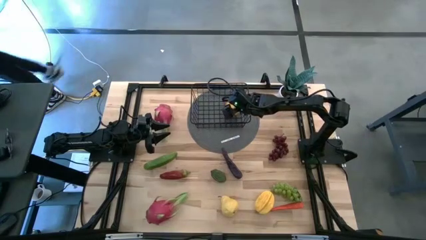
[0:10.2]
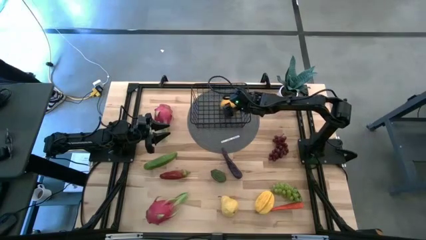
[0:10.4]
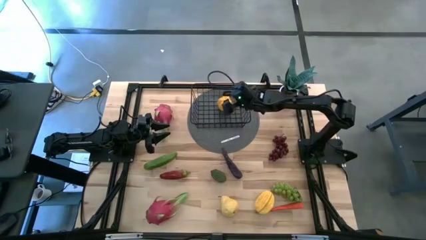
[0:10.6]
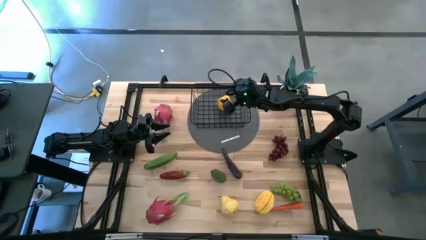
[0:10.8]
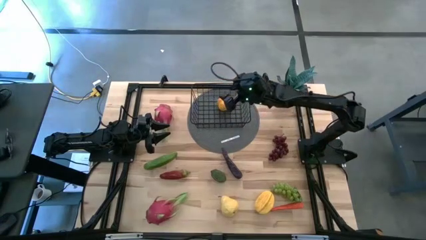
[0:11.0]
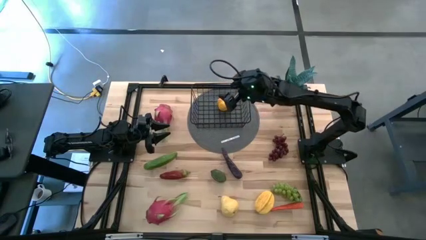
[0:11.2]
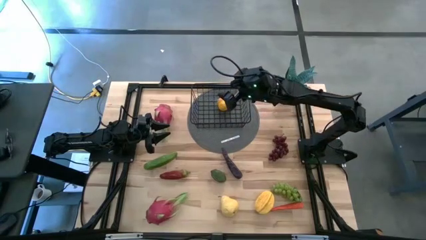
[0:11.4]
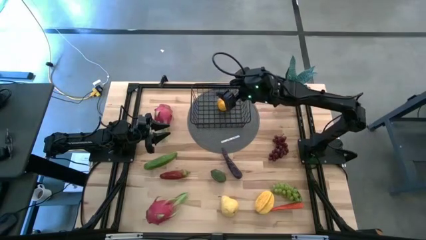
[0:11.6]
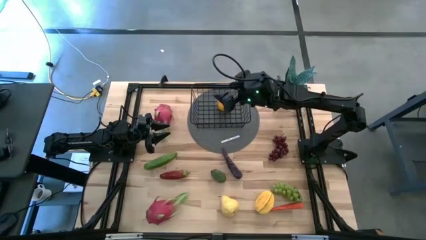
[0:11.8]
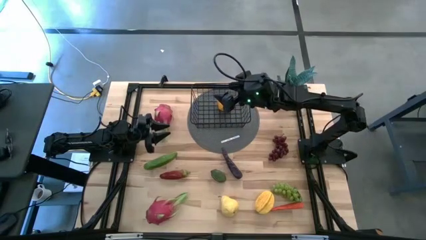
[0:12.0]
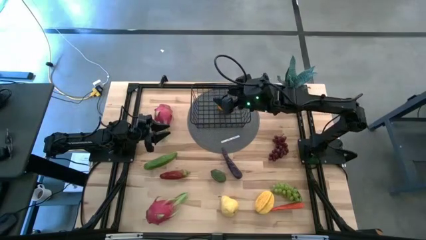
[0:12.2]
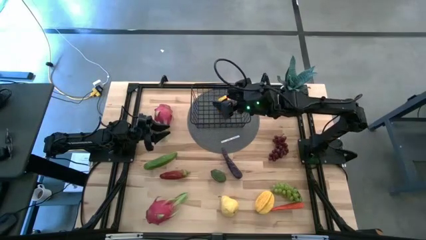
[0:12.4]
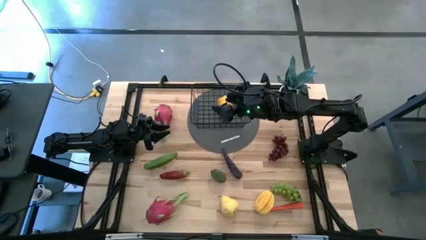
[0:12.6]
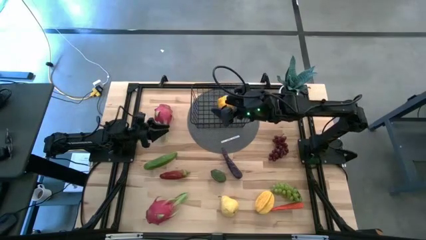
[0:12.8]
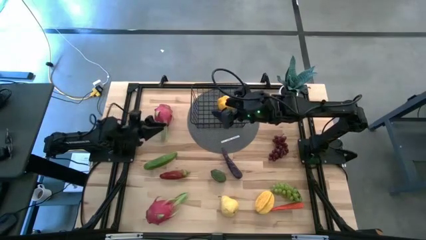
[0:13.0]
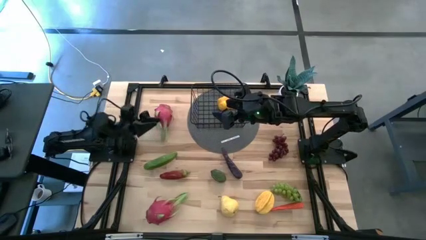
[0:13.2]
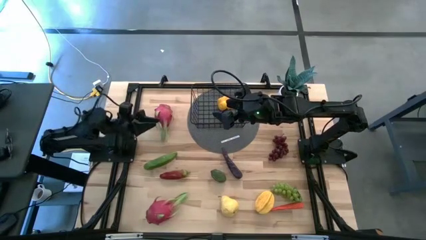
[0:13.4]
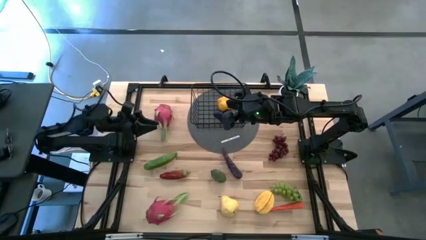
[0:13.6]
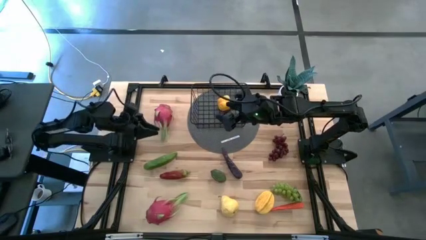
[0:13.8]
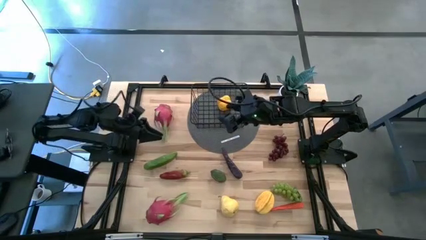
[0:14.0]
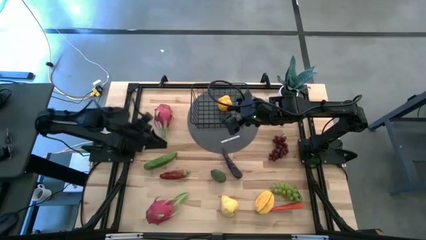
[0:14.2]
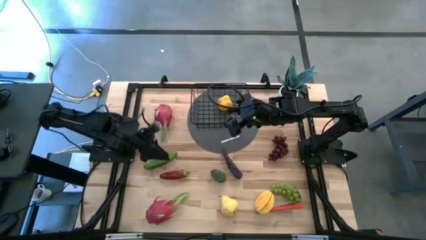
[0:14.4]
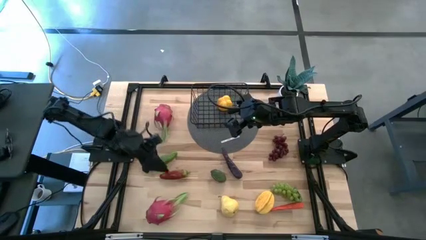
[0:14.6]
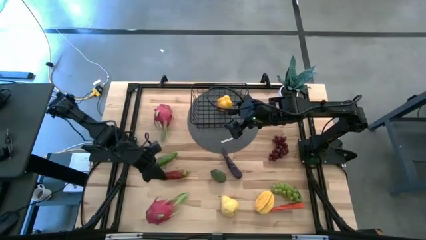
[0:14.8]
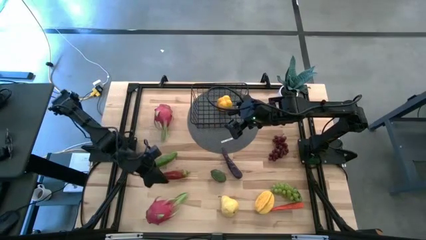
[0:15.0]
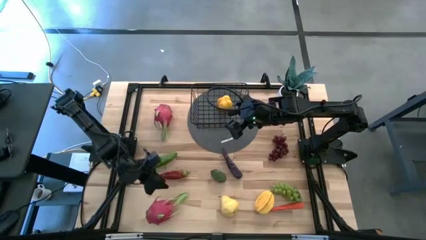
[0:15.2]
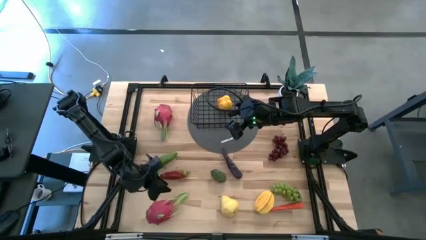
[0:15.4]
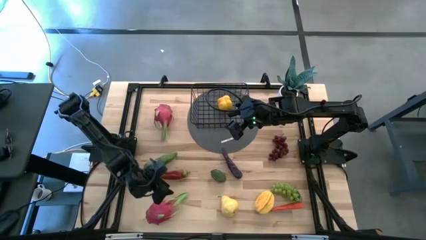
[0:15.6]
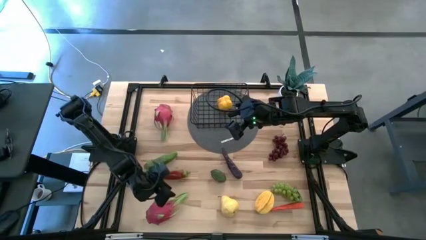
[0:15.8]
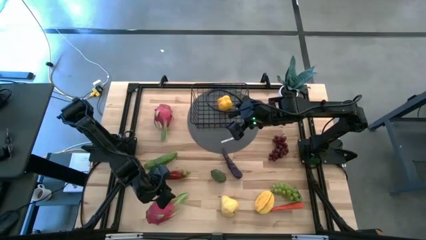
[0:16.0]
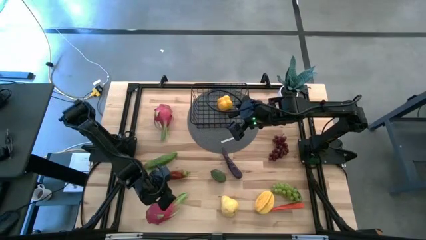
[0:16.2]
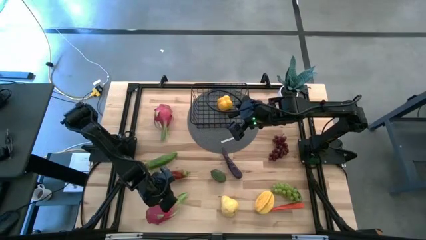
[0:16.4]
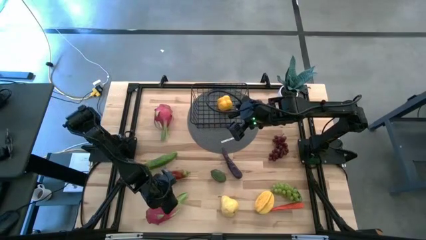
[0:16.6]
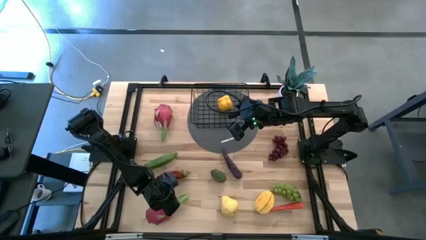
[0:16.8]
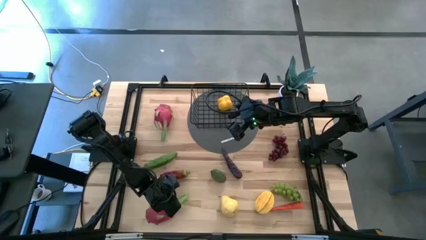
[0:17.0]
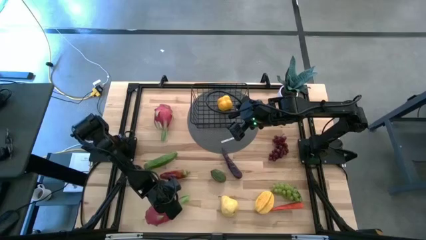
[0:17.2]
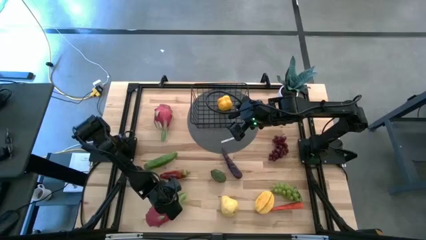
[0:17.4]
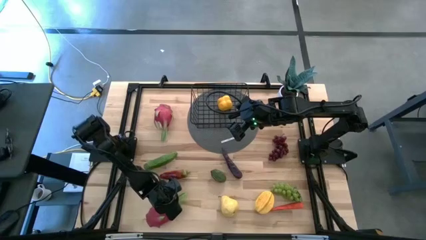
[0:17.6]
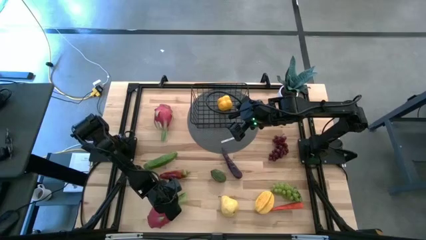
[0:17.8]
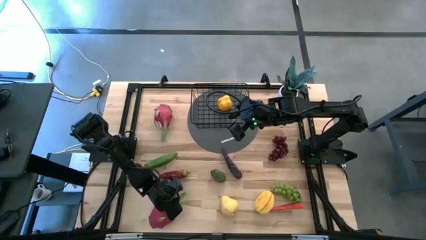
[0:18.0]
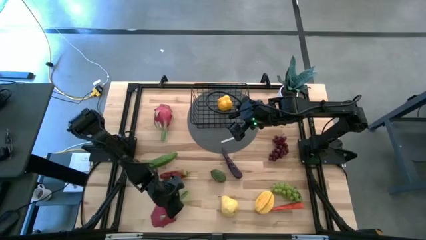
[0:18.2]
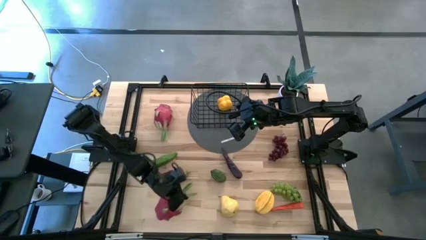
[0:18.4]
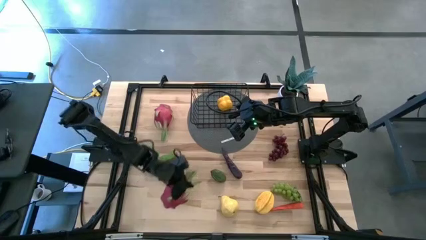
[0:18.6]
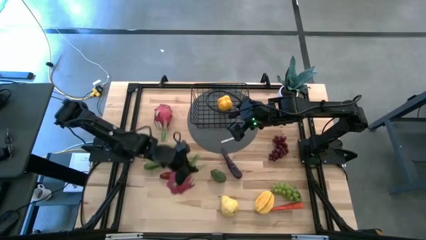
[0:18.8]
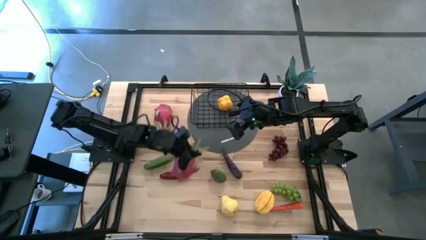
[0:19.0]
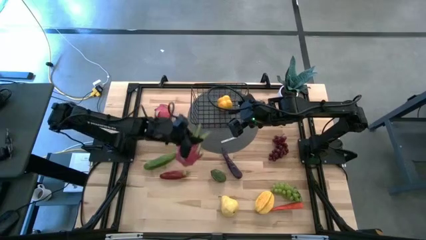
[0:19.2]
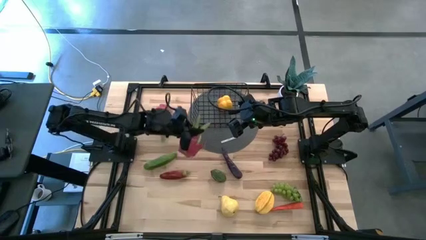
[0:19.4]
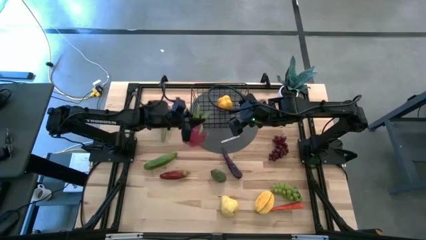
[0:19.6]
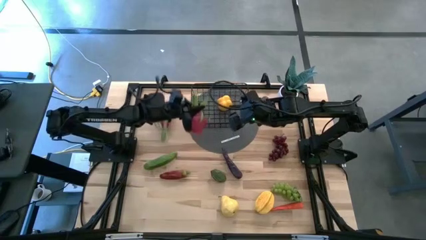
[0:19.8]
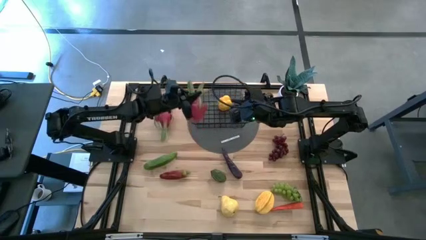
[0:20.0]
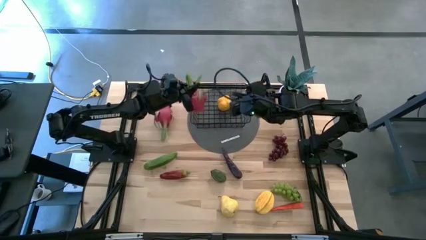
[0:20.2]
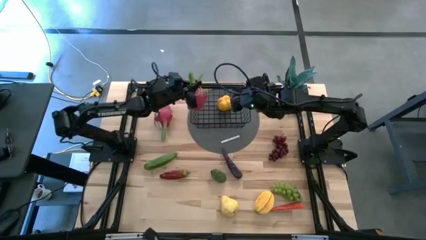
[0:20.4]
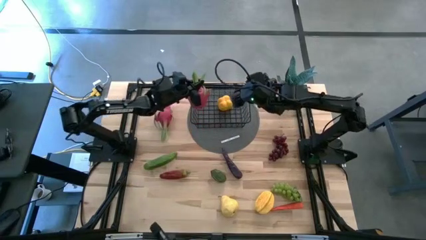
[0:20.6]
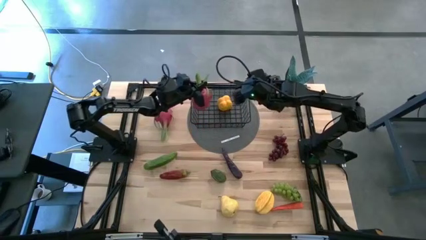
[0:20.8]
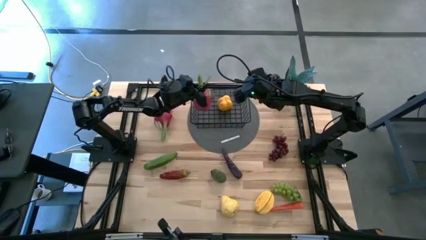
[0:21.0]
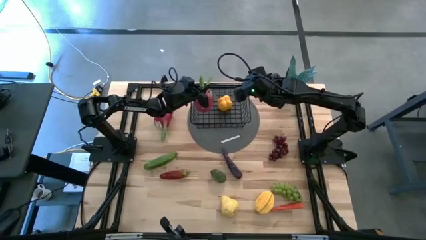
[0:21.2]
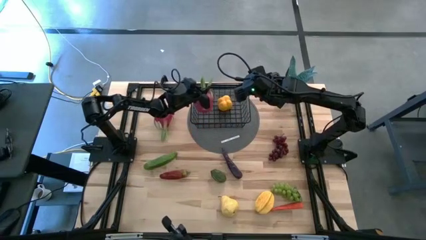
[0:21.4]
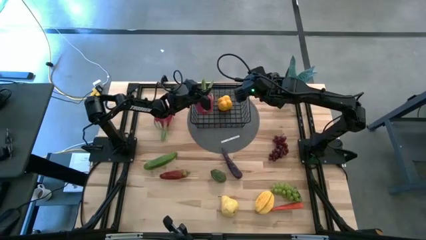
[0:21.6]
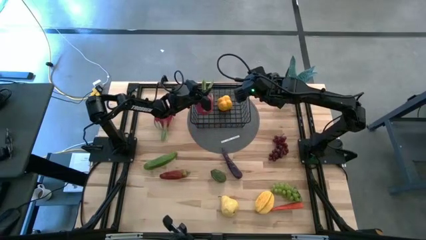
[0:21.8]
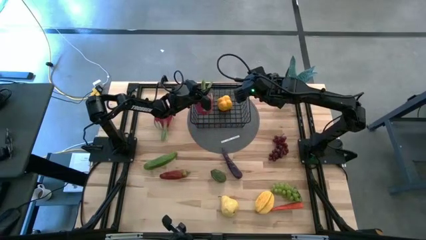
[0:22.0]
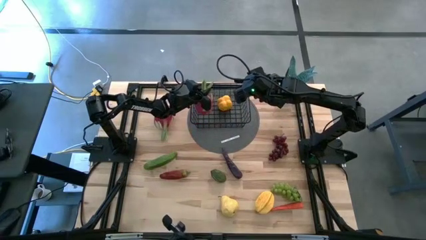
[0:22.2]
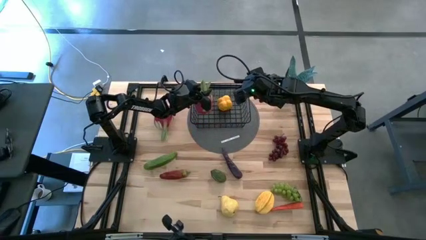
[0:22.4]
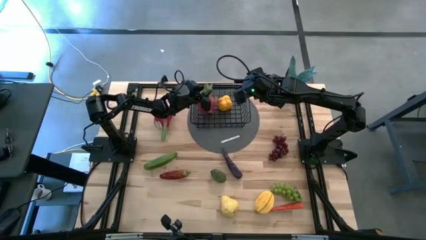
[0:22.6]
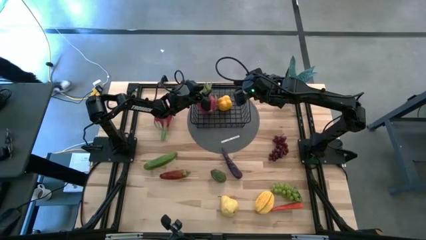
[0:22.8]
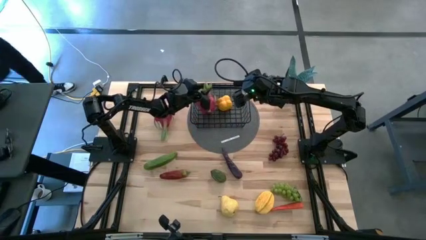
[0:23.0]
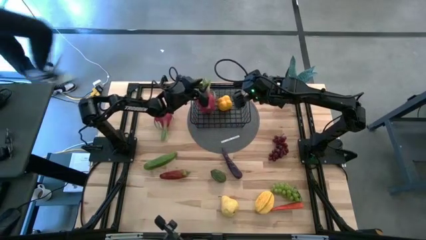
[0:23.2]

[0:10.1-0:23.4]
Task: Build produce basket
Put the bottom pink dragon fruit into the black wire basket
